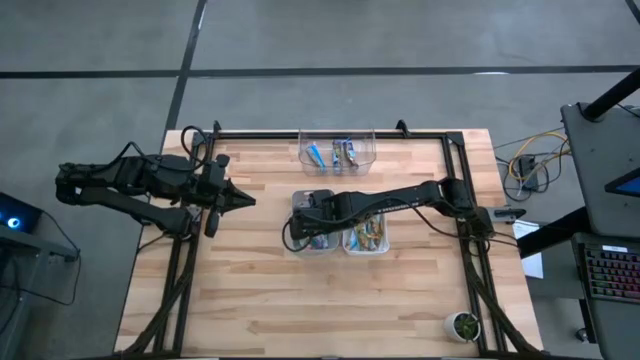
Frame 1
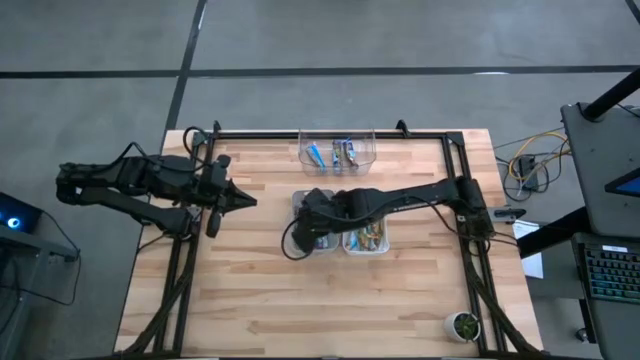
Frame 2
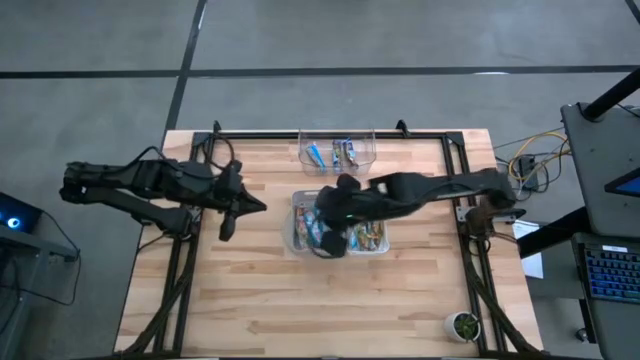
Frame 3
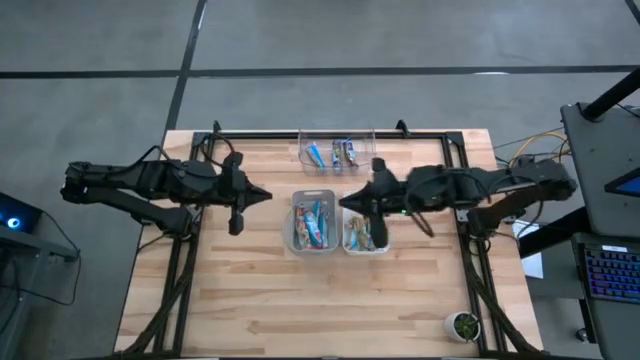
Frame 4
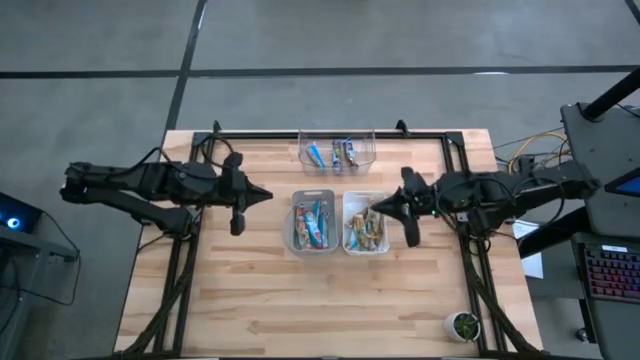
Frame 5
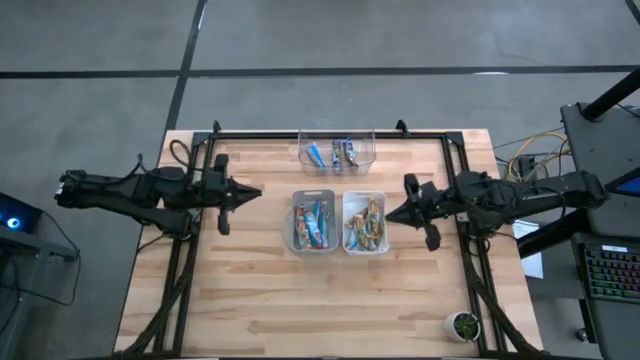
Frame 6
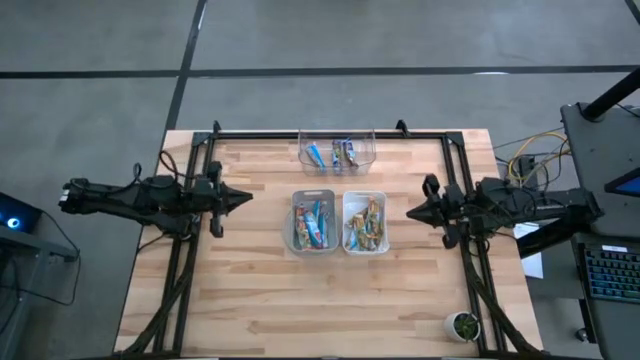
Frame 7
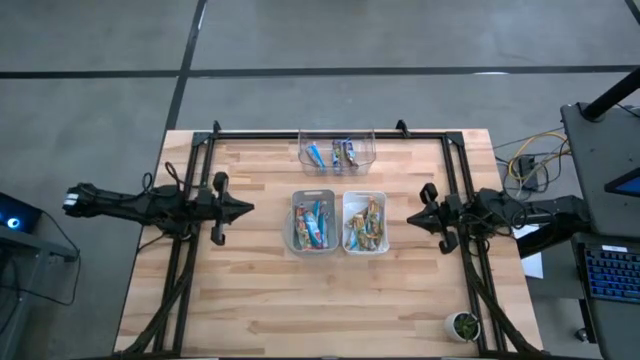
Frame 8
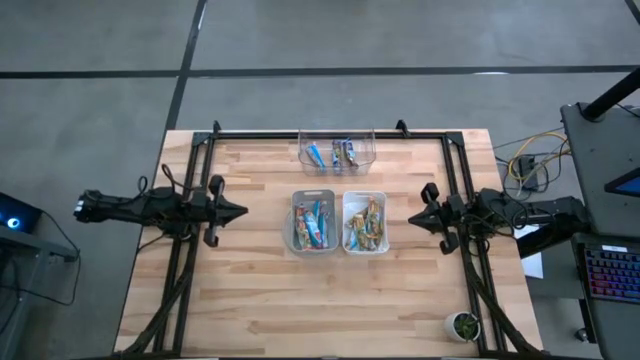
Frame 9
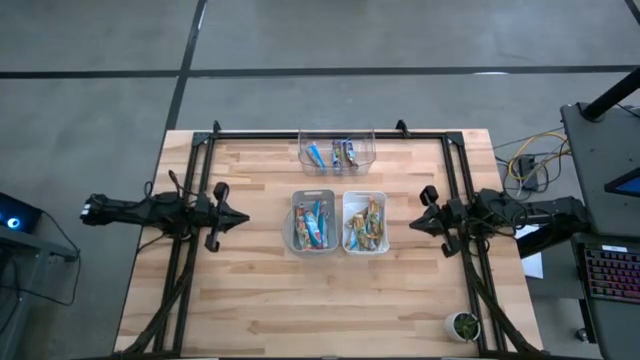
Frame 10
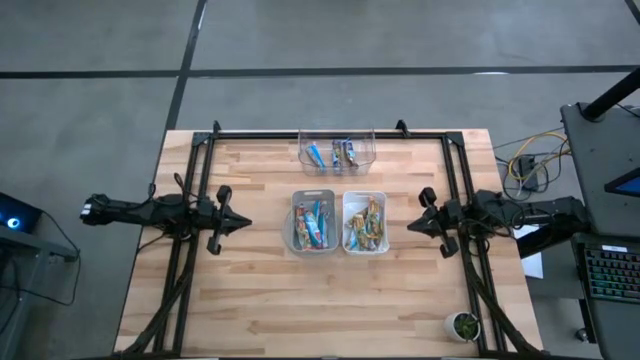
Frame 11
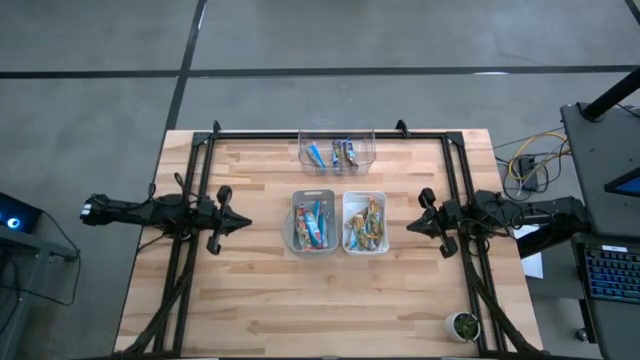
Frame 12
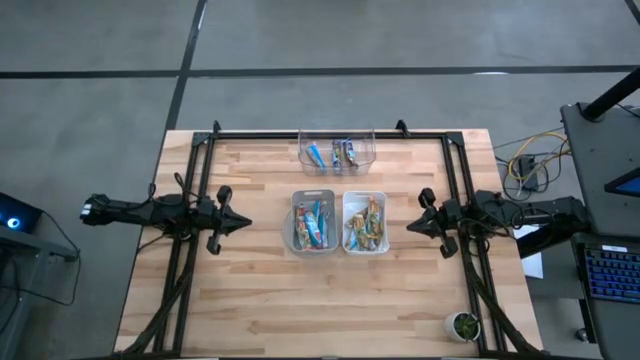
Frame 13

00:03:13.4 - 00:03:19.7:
Task: Pick and place Granola Bars by type
Return to Home Position

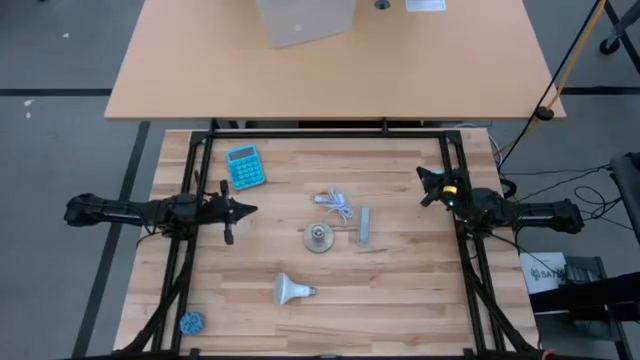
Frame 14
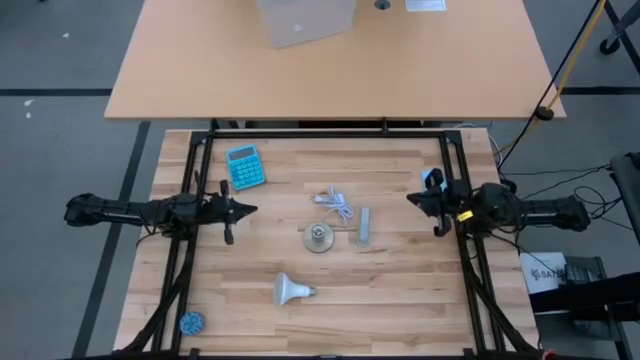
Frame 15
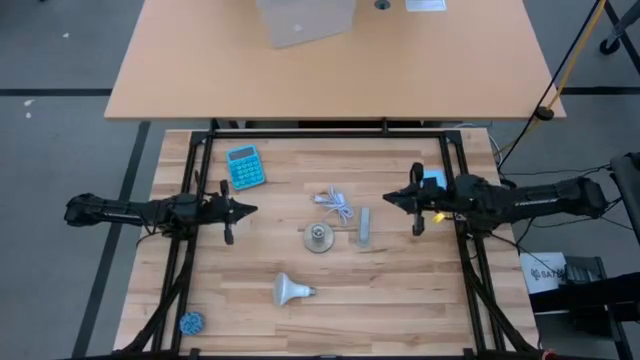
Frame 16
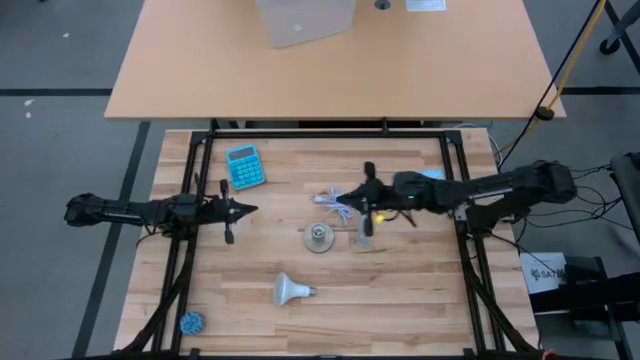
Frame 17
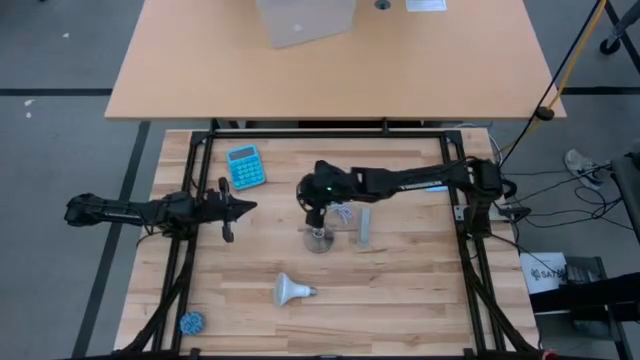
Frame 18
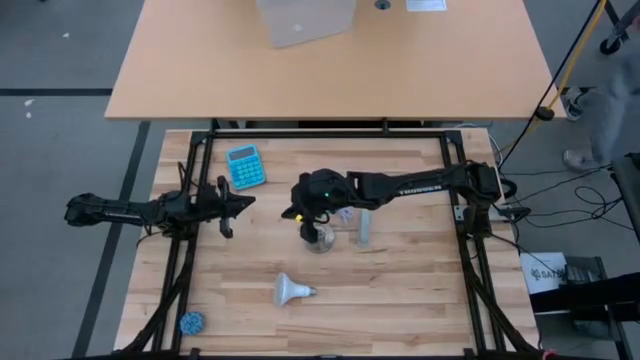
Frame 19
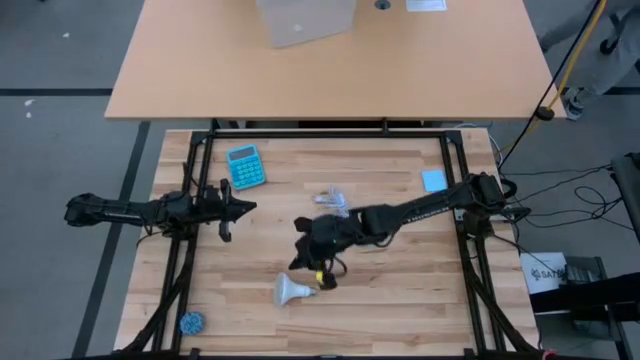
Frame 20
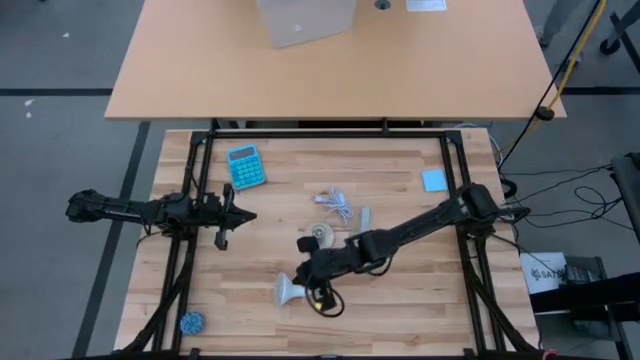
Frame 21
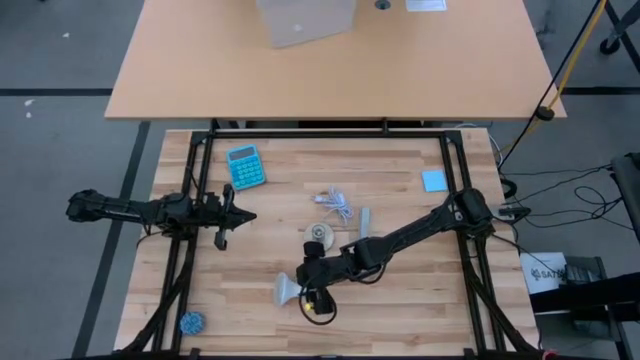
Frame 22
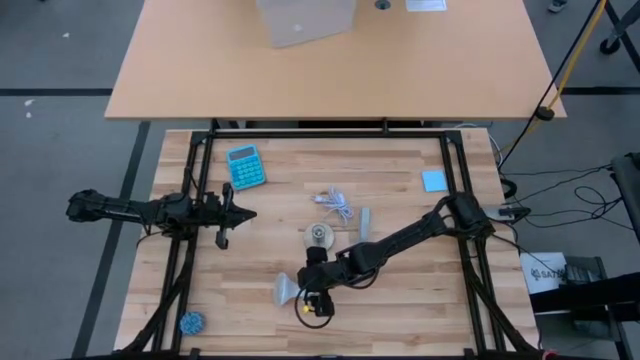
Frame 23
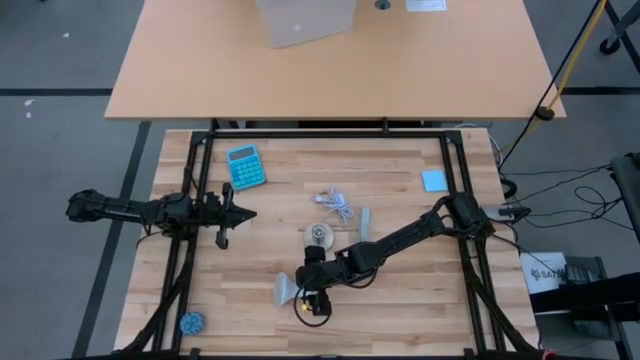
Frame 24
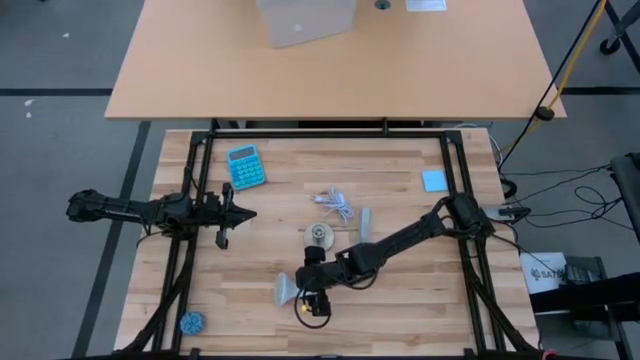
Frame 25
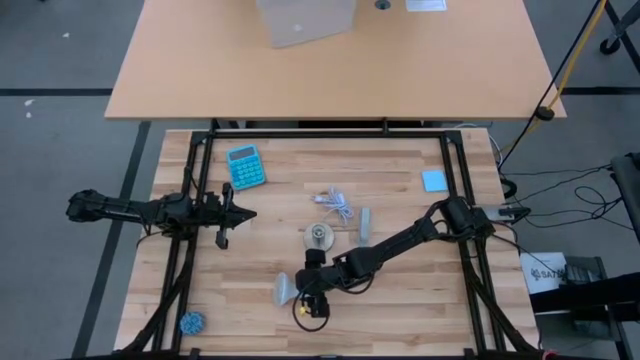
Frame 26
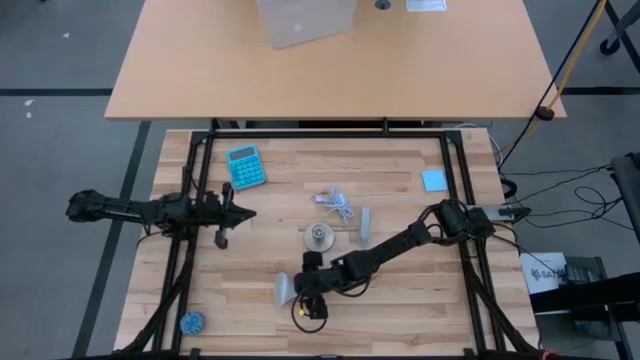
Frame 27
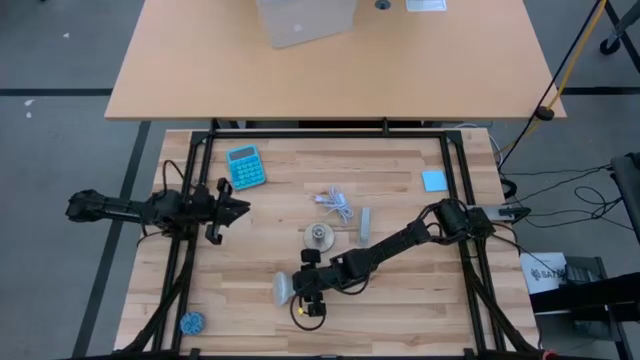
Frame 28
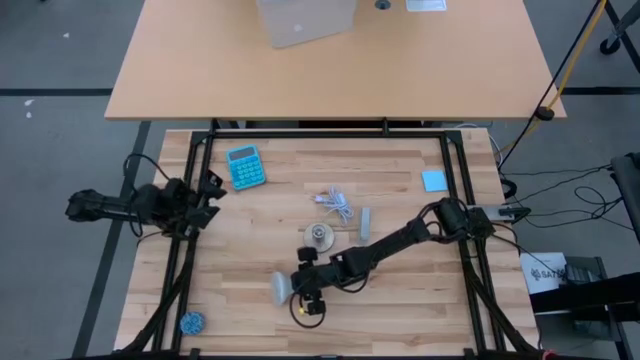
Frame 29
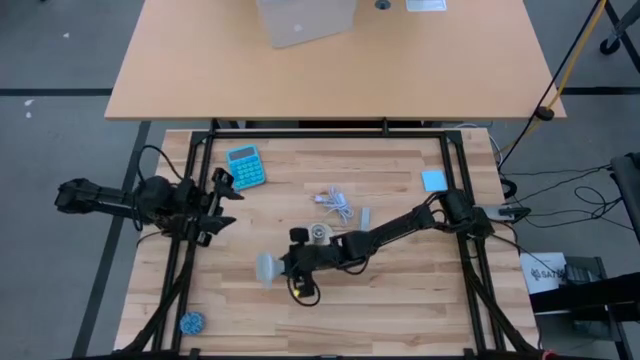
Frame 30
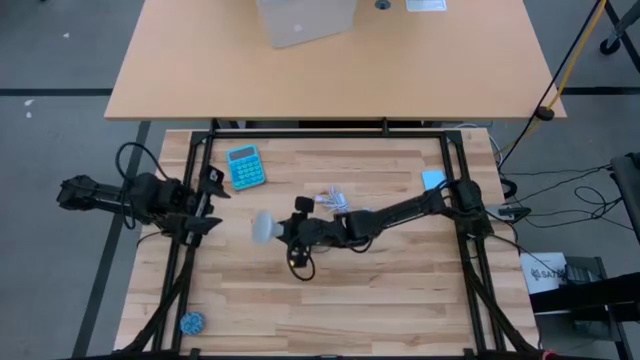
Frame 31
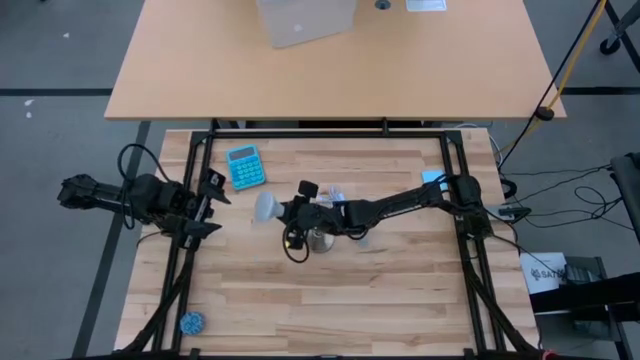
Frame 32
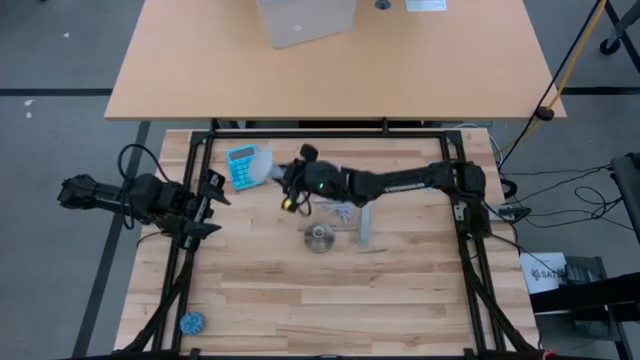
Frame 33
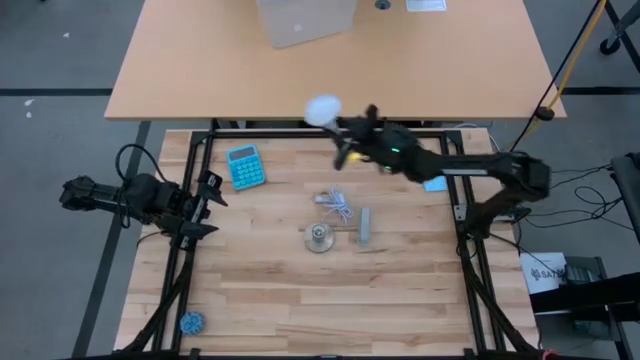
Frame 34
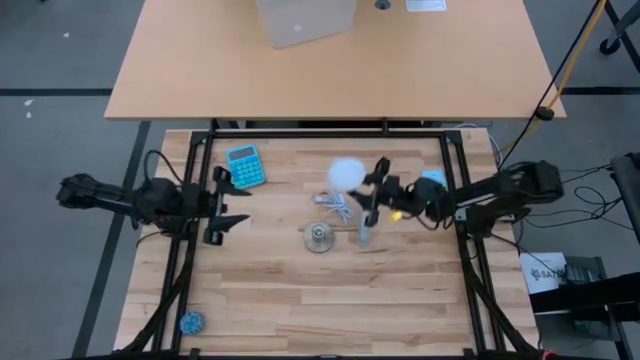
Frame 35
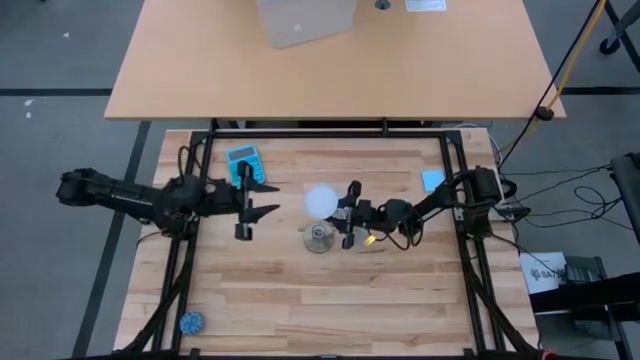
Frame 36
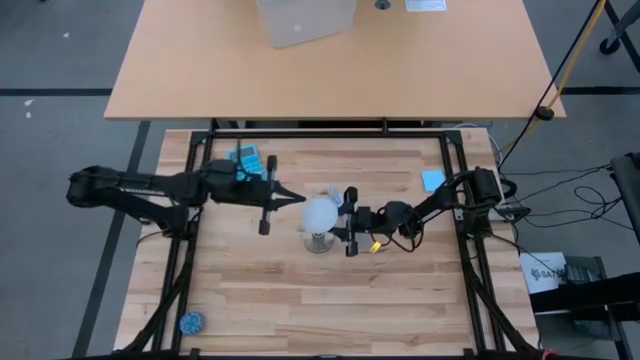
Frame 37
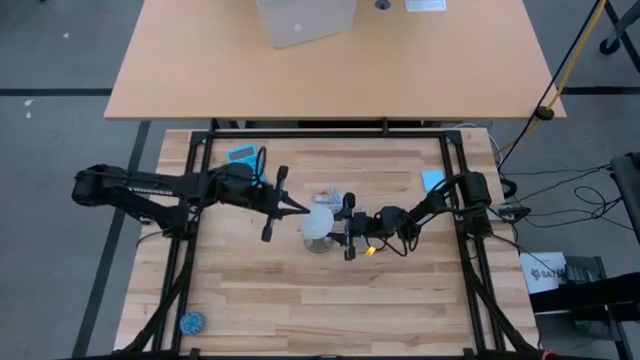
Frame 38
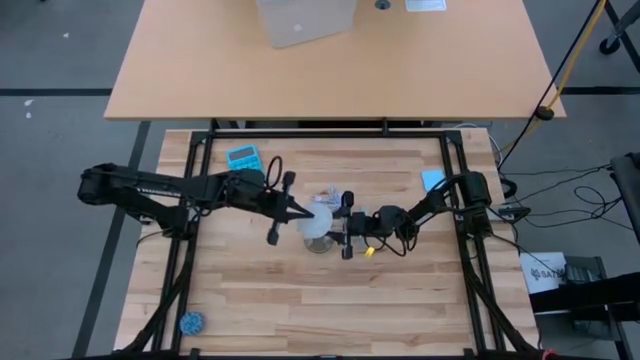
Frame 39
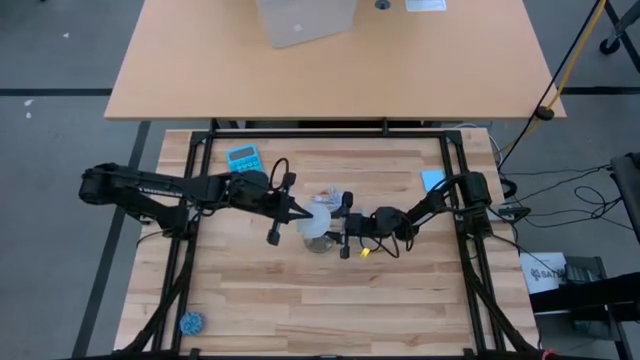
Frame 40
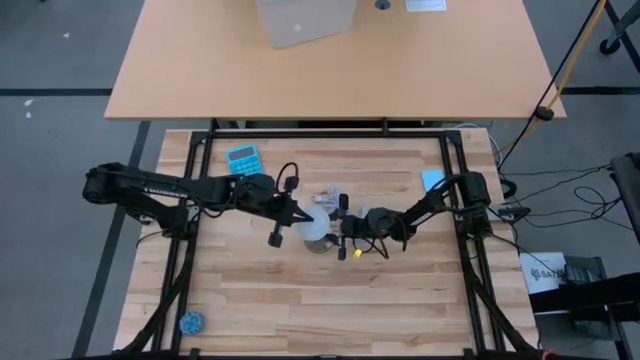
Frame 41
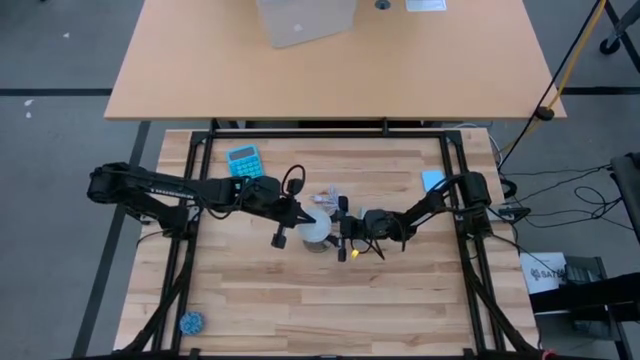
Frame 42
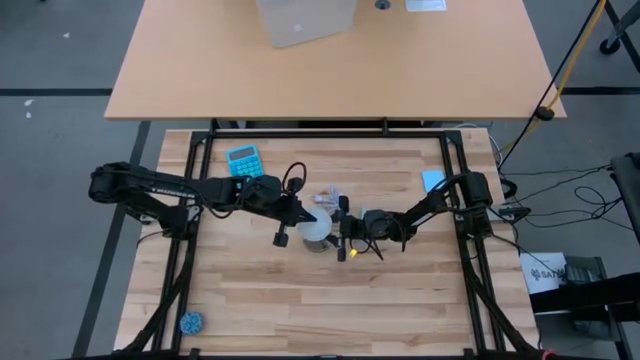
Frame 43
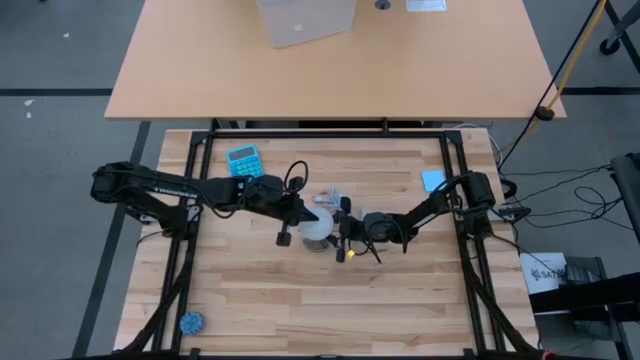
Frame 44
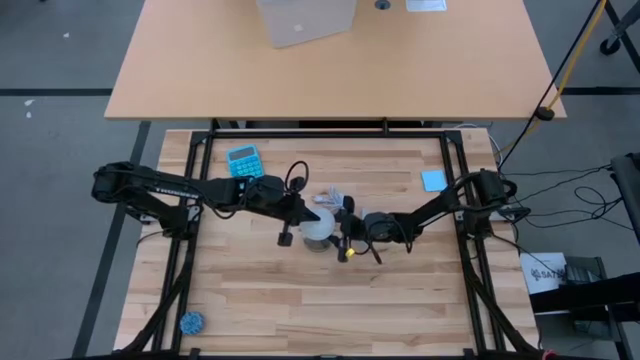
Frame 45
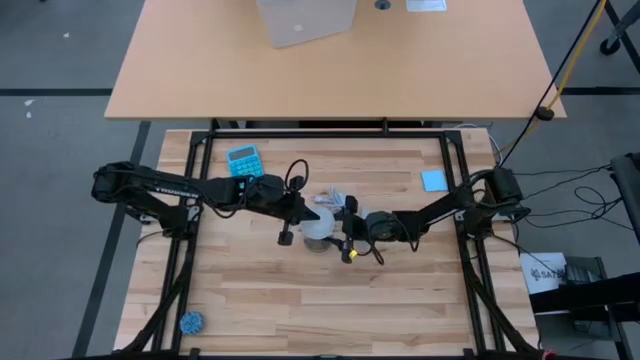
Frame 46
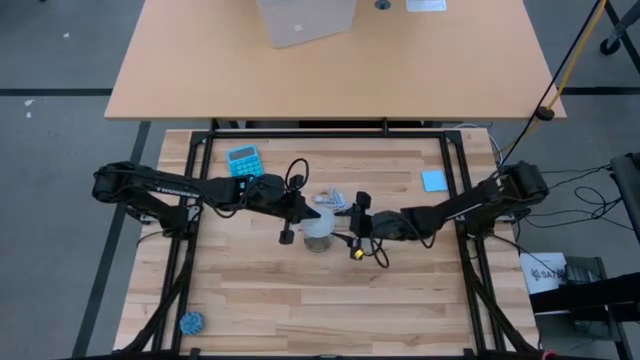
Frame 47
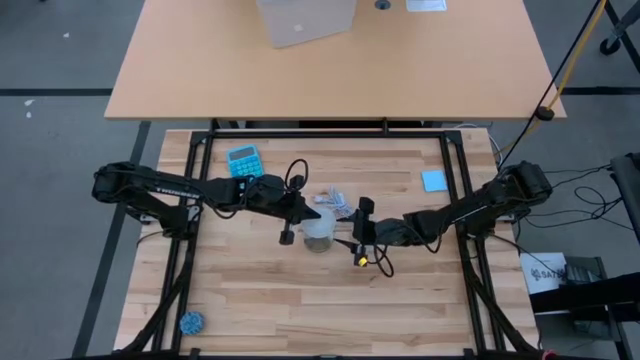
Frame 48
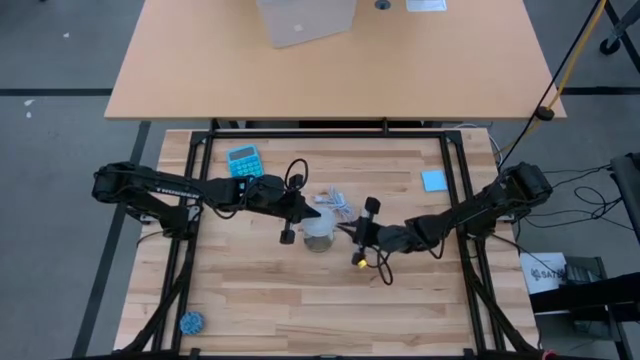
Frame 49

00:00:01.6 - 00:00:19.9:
Task: Screw lightbulb
Insert the light bulb into the lamp
